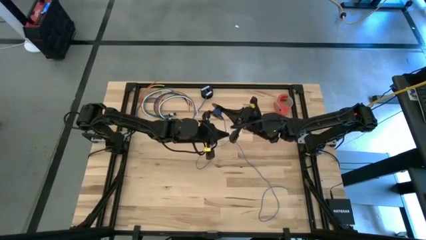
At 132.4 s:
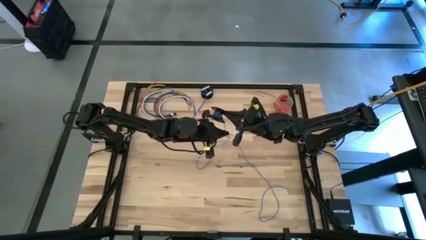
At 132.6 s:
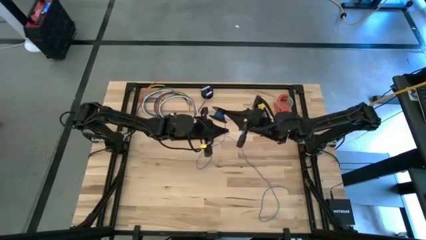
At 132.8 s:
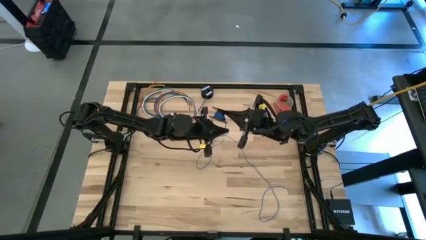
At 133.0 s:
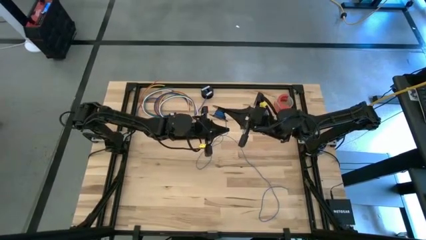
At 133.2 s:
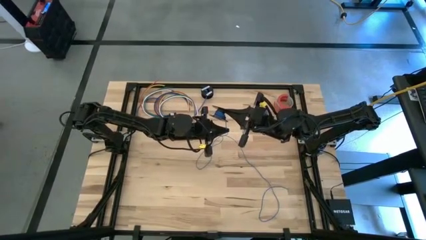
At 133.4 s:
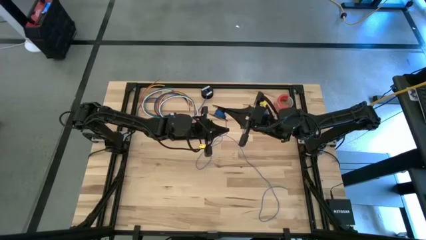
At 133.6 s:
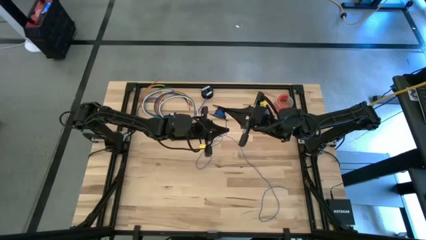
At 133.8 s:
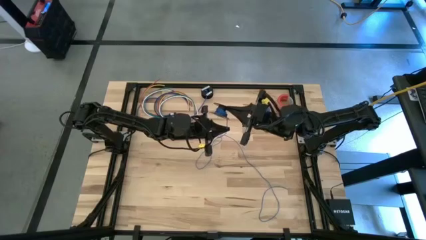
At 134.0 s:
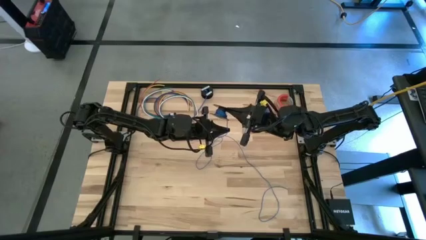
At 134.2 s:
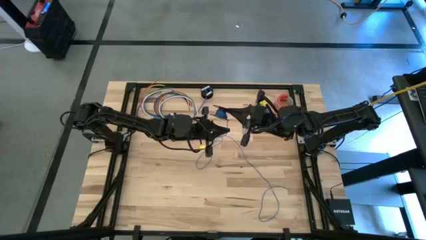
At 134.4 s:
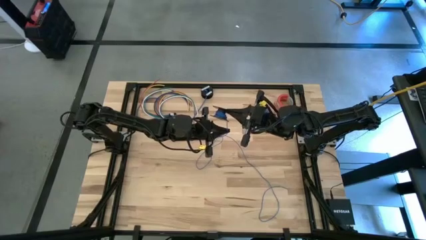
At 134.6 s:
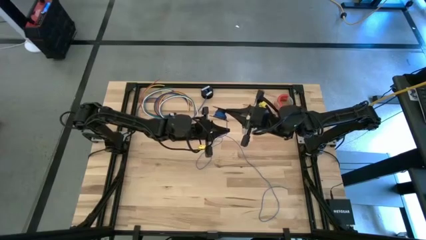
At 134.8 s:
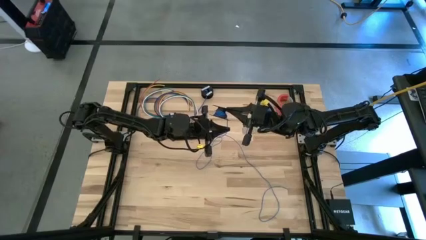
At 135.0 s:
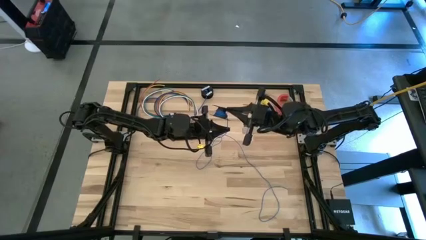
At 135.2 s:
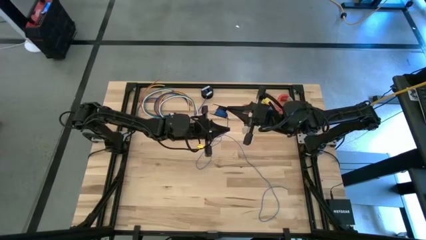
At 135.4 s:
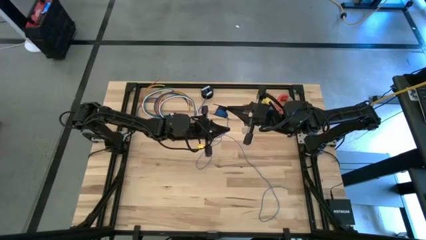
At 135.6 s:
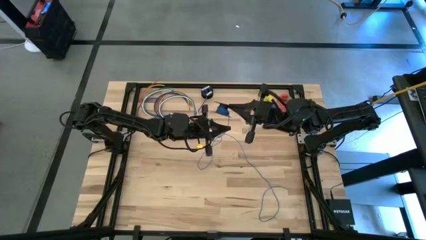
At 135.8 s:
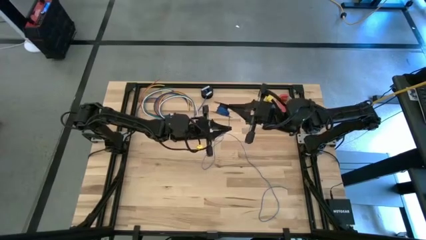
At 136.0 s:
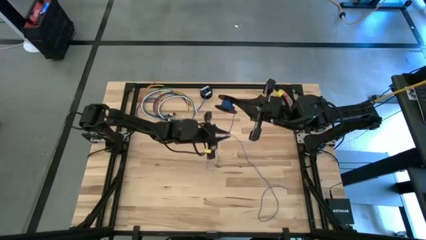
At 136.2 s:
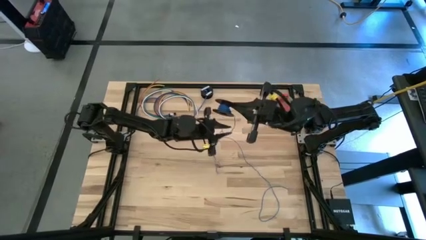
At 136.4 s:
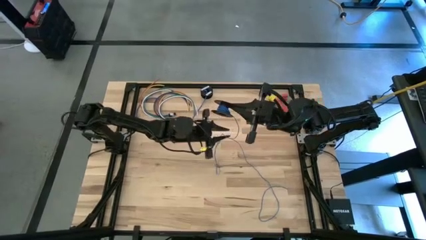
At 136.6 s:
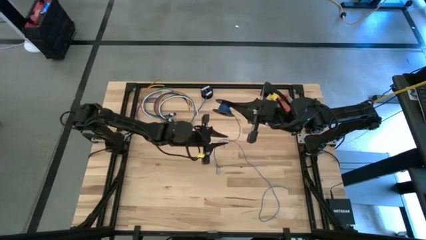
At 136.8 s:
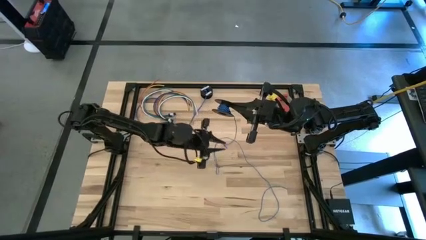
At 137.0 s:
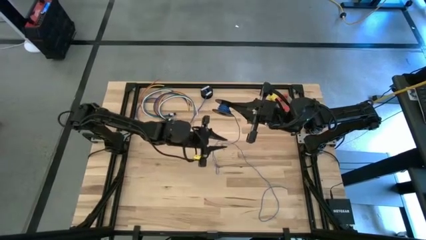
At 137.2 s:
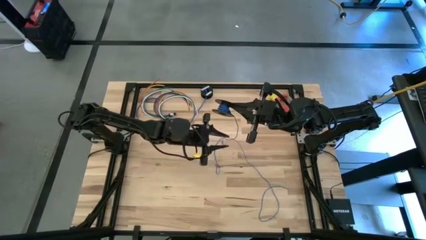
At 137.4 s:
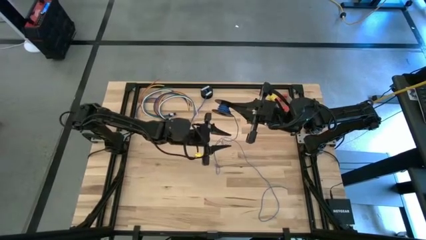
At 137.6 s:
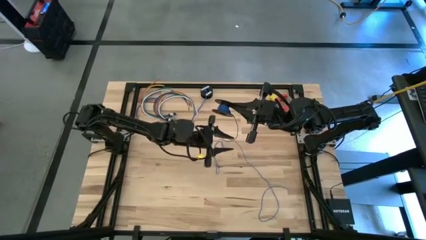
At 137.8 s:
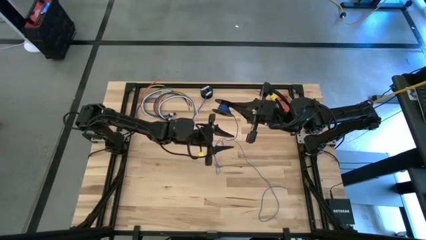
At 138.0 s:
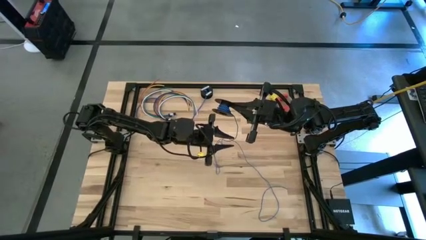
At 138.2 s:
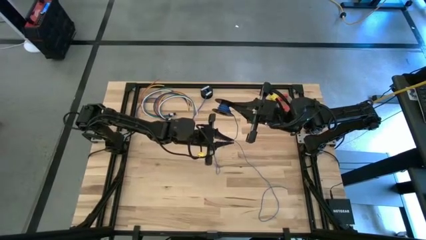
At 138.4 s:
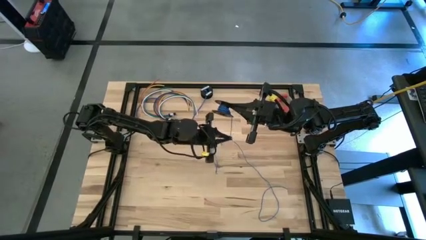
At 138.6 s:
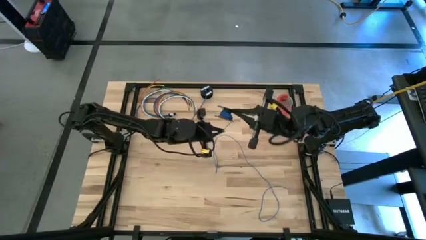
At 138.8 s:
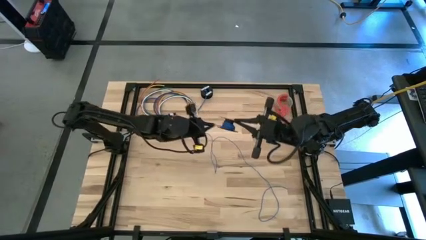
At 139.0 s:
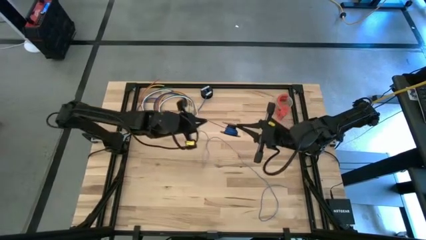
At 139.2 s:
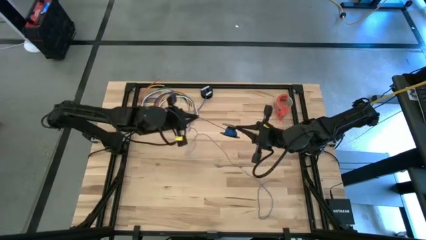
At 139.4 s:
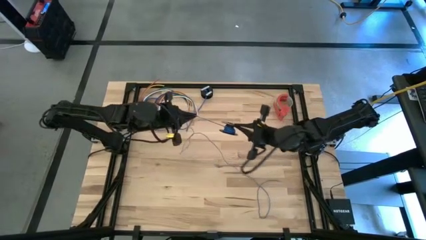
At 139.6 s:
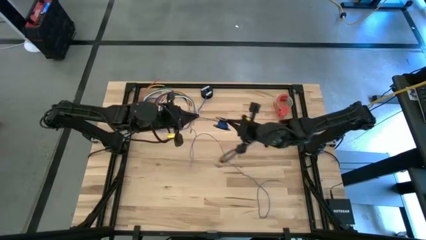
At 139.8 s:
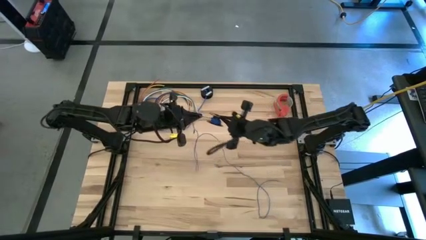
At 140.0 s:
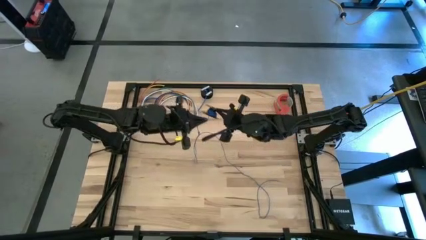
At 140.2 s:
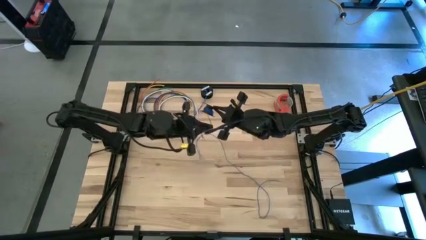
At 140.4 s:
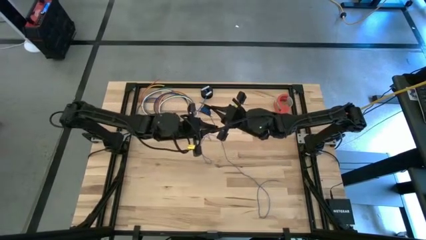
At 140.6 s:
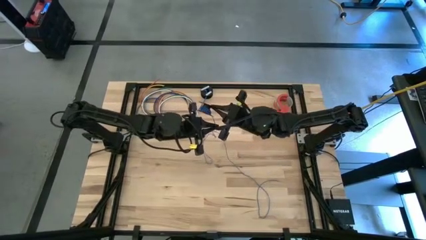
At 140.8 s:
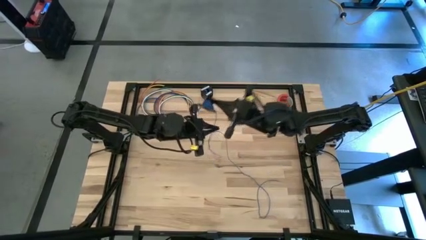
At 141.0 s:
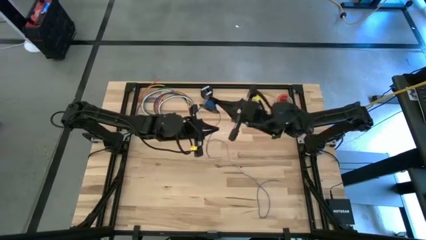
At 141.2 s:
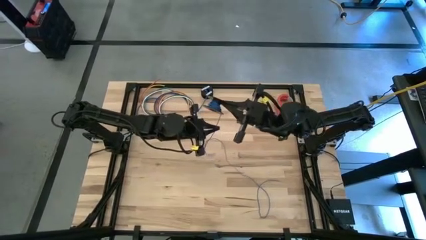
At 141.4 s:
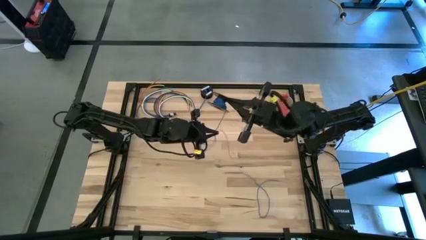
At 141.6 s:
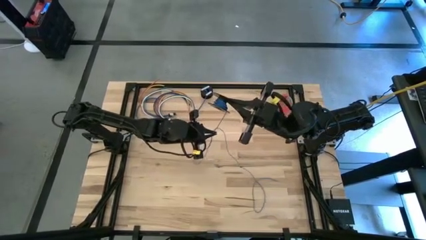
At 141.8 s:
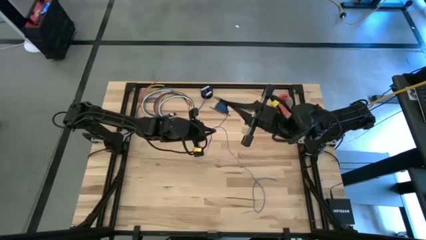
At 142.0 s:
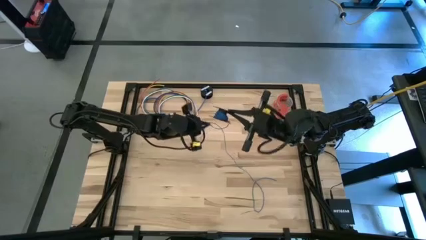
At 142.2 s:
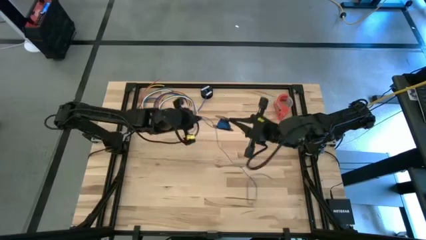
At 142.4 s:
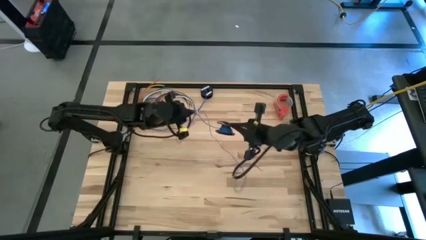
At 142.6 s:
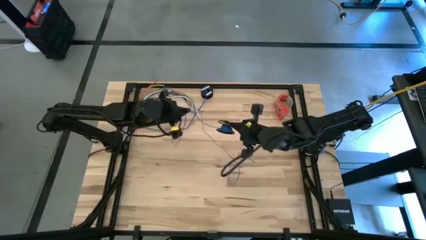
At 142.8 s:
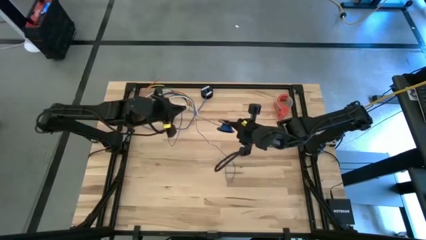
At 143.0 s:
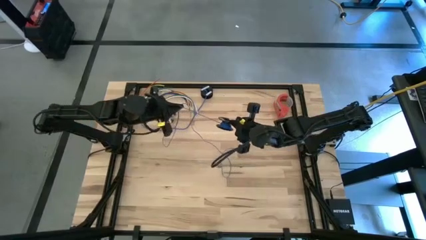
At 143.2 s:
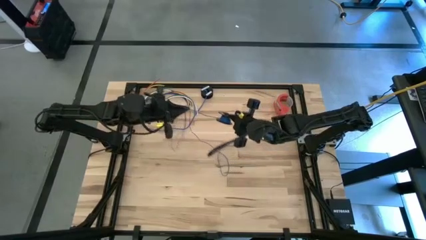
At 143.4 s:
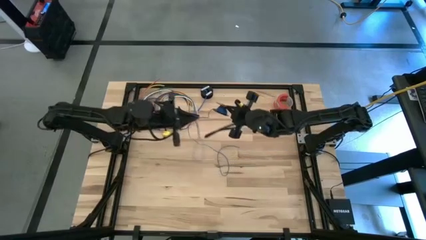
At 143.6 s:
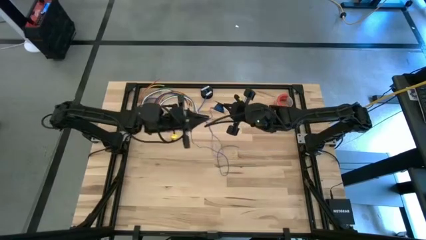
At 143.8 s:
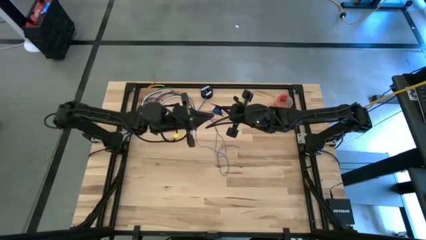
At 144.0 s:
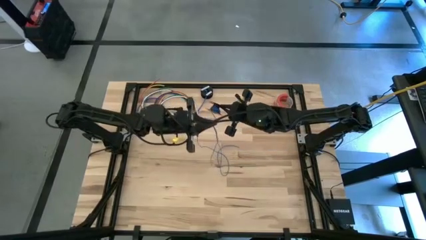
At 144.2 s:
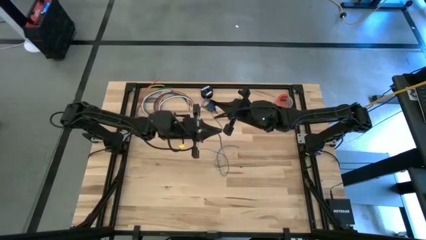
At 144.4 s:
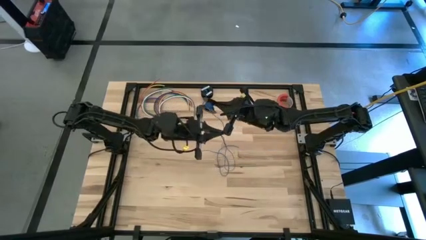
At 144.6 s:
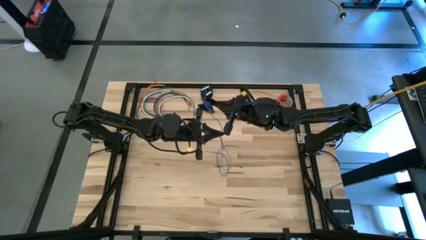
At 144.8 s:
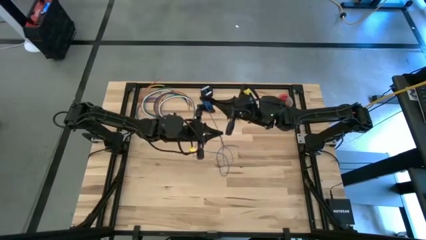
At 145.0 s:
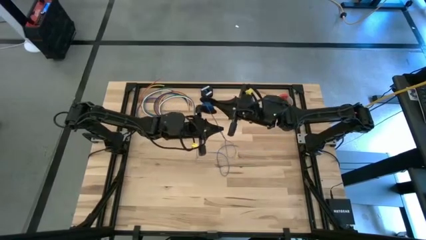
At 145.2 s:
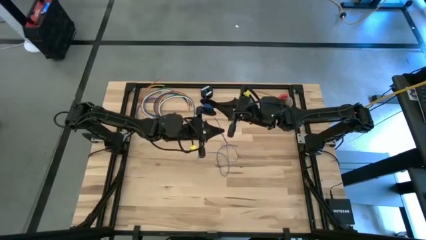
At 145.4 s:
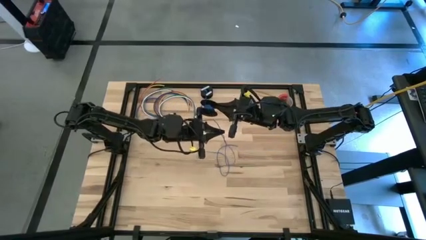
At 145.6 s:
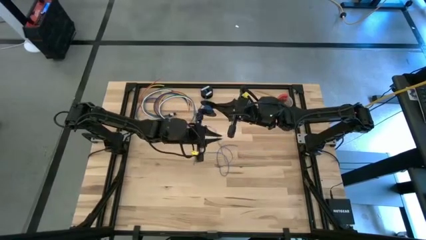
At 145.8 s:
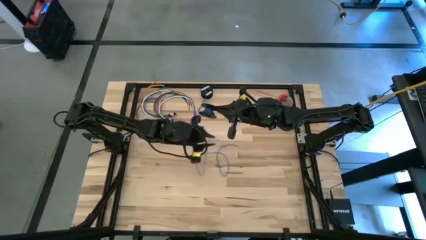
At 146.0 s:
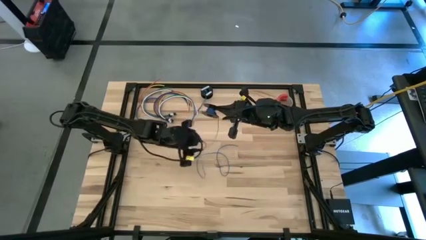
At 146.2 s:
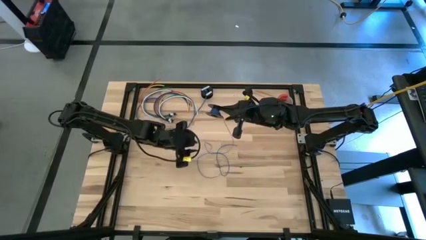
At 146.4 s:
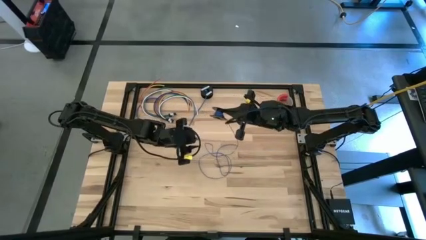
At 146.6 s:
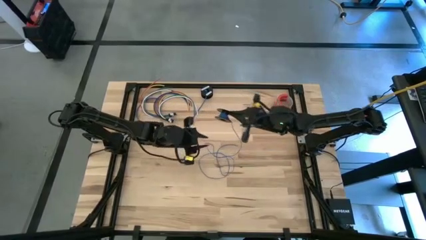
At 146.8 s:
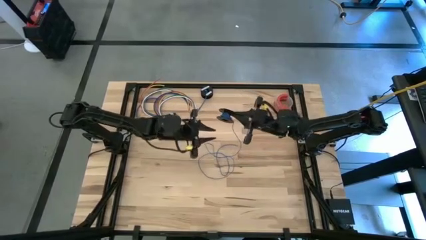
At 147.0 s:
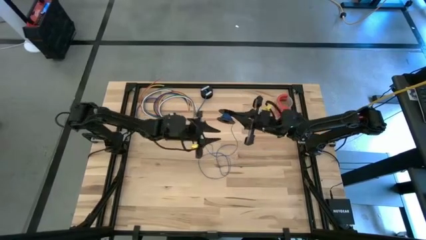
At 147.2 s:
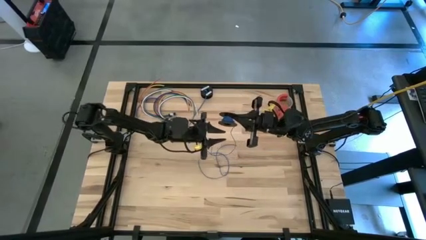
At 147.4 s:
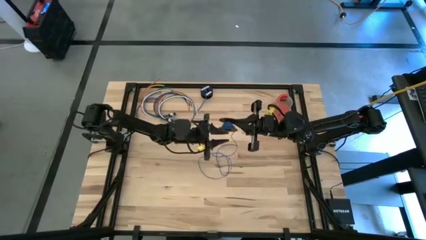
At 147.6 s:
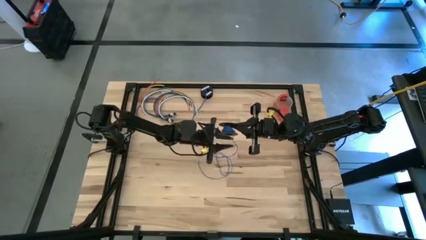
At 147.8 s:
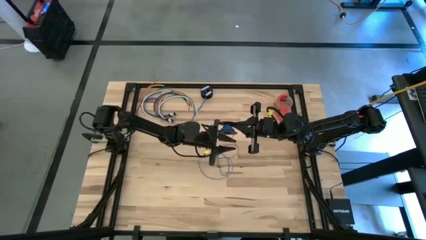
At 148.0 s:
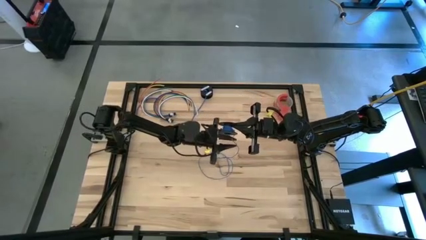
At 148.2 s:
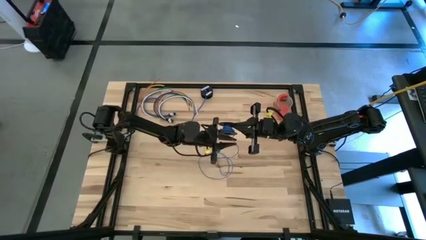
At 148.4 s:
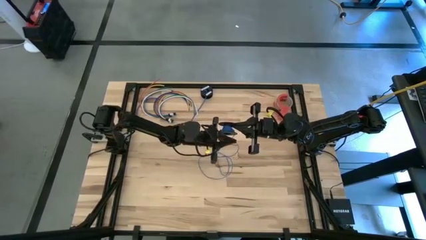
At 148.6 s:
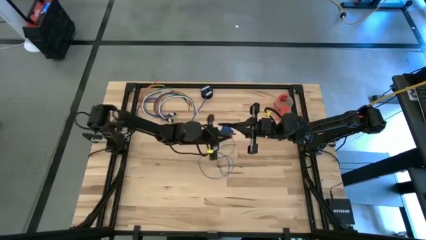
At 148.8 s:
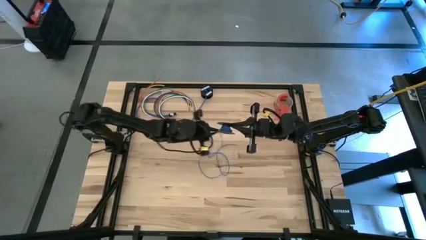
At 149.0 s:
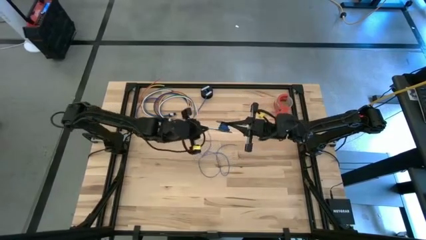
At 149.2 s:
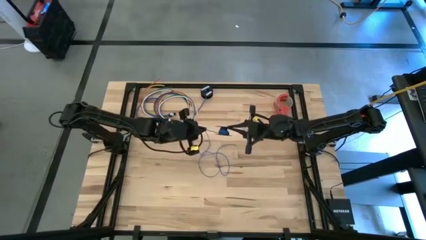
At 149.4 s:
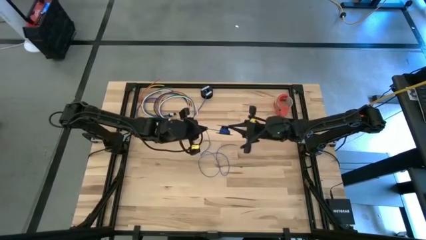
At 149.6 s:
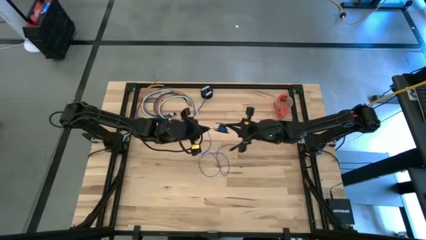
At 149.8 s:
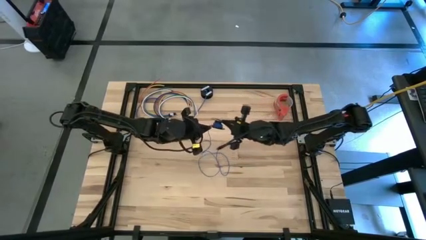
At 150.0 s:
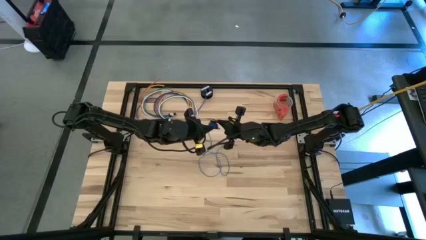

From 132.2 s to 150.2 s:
Task: Coil cords
Coil the blue wire onto the black spool
